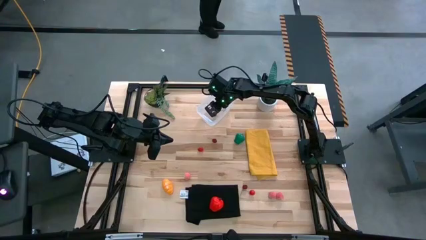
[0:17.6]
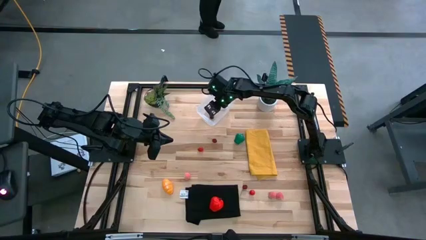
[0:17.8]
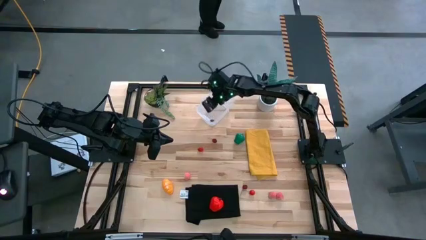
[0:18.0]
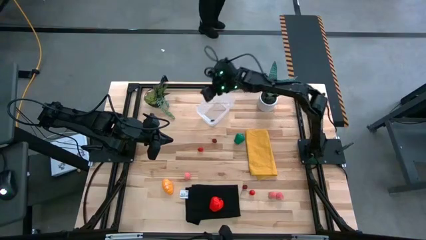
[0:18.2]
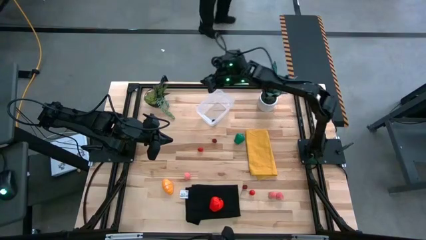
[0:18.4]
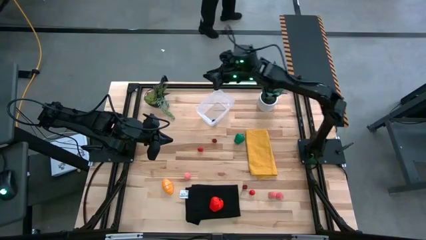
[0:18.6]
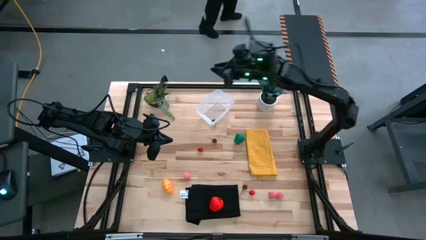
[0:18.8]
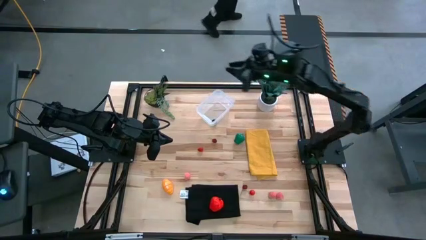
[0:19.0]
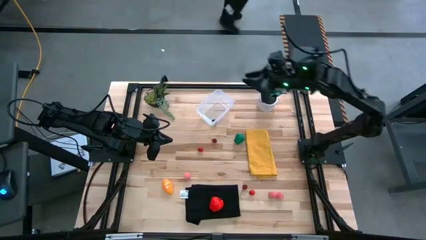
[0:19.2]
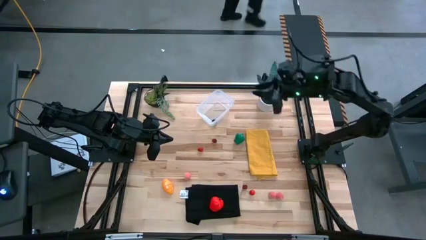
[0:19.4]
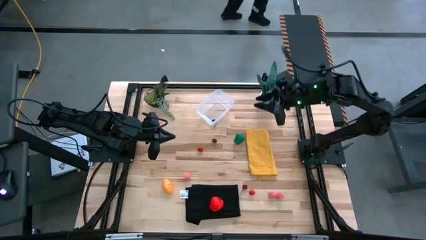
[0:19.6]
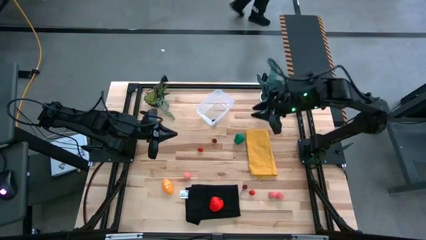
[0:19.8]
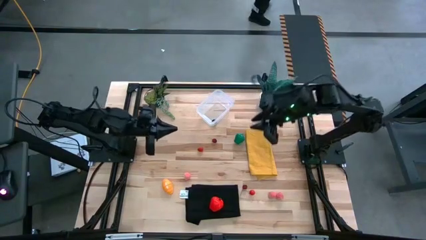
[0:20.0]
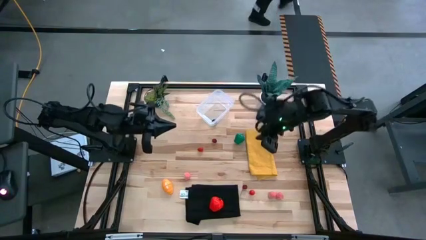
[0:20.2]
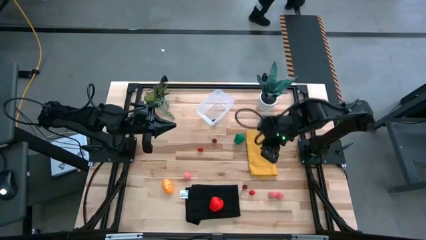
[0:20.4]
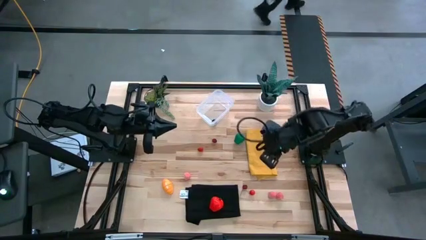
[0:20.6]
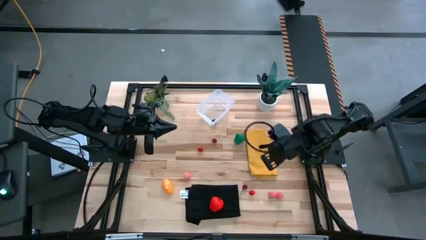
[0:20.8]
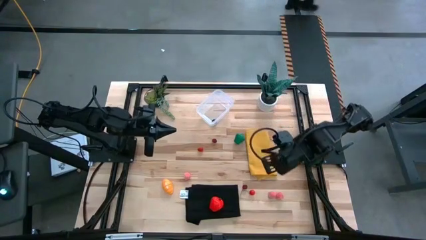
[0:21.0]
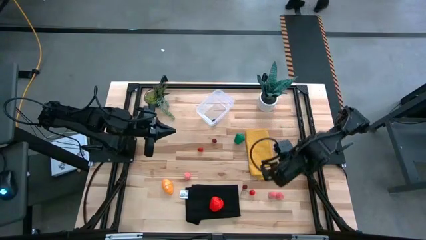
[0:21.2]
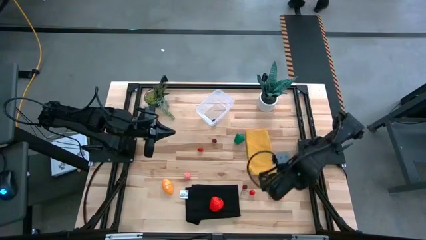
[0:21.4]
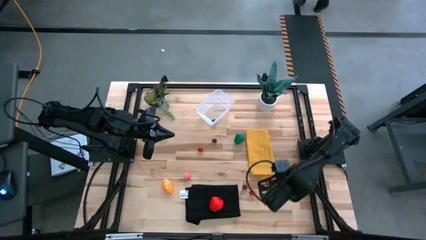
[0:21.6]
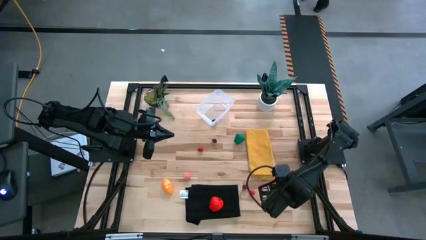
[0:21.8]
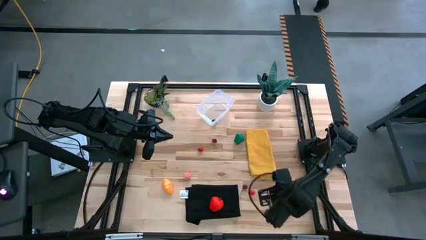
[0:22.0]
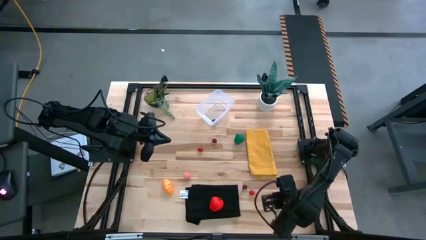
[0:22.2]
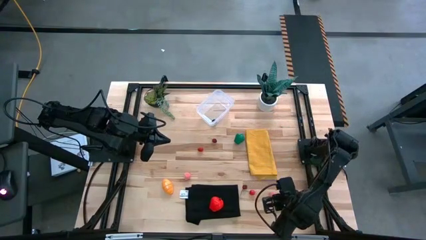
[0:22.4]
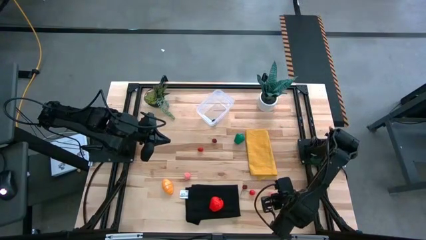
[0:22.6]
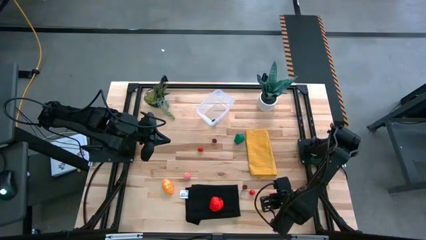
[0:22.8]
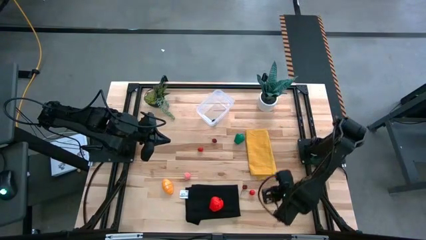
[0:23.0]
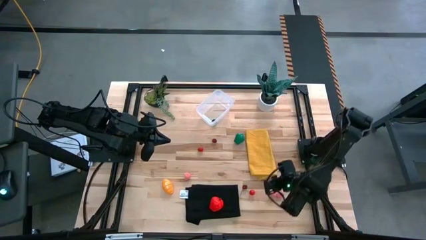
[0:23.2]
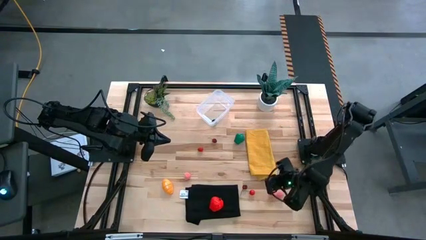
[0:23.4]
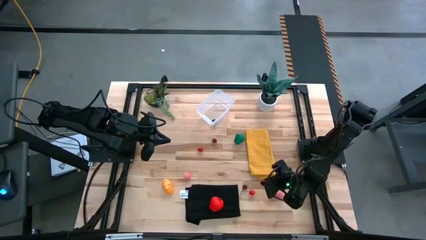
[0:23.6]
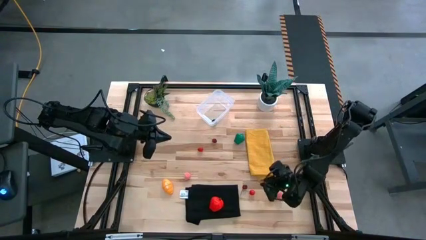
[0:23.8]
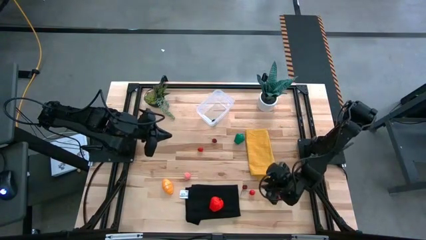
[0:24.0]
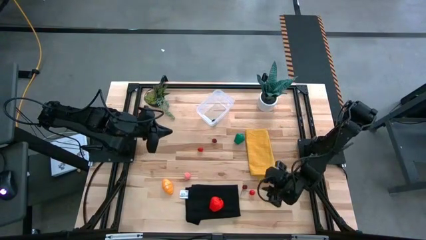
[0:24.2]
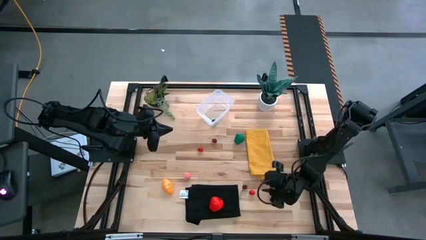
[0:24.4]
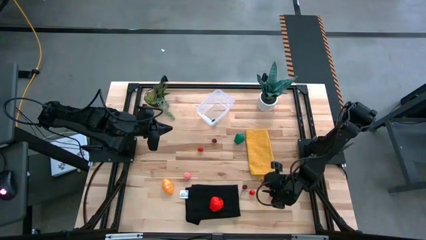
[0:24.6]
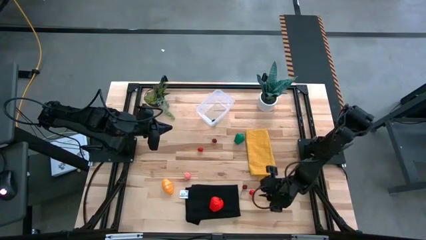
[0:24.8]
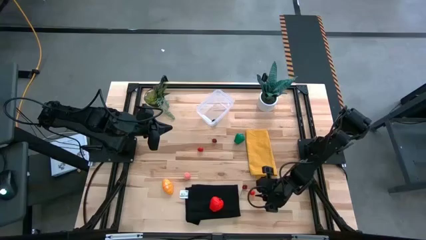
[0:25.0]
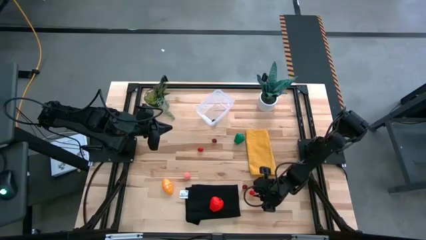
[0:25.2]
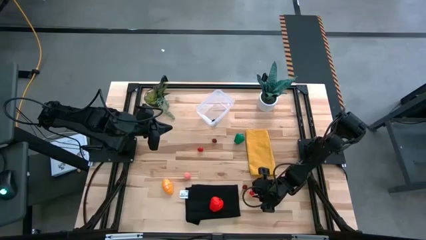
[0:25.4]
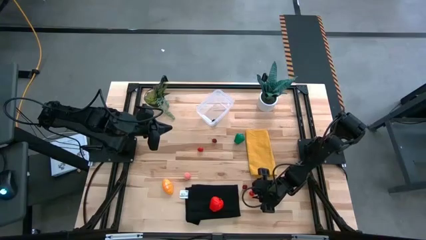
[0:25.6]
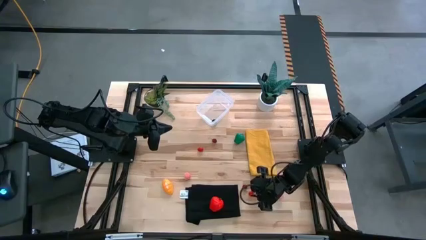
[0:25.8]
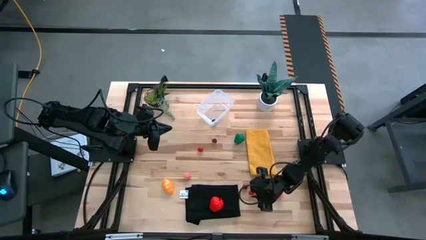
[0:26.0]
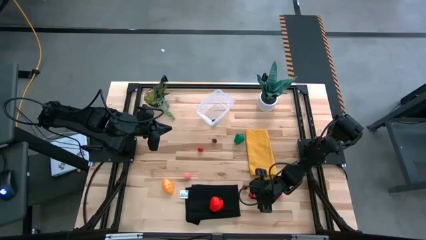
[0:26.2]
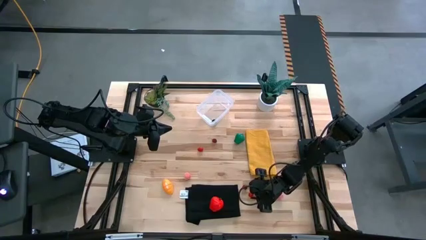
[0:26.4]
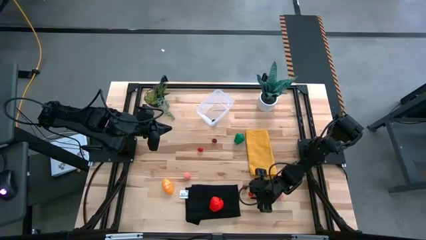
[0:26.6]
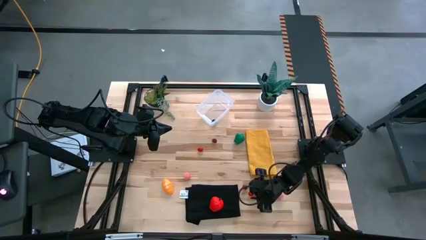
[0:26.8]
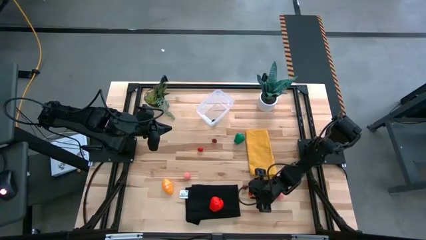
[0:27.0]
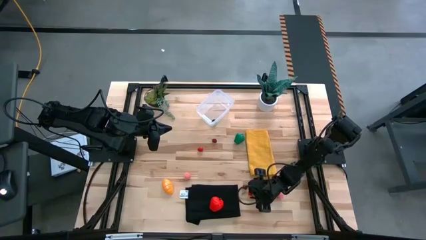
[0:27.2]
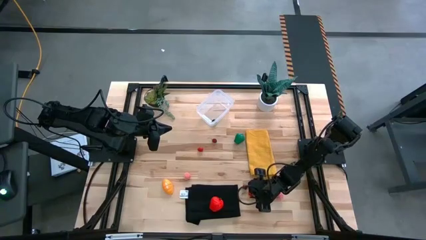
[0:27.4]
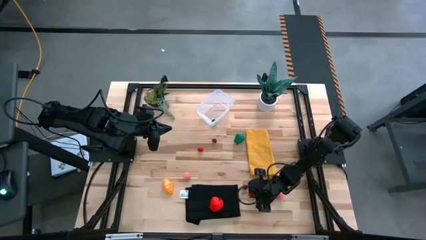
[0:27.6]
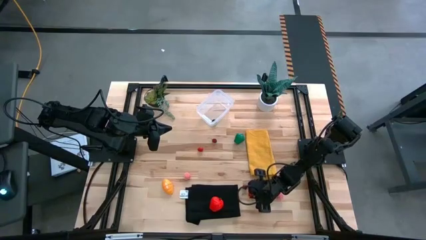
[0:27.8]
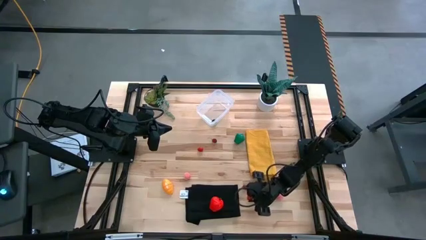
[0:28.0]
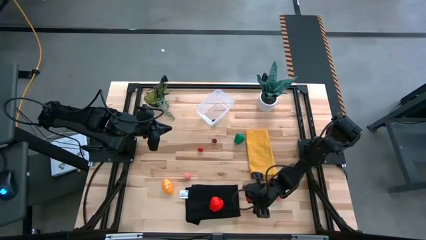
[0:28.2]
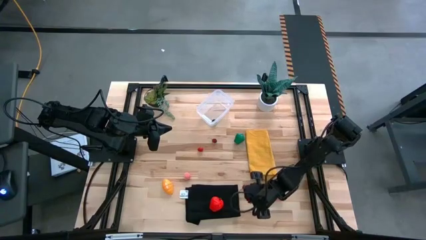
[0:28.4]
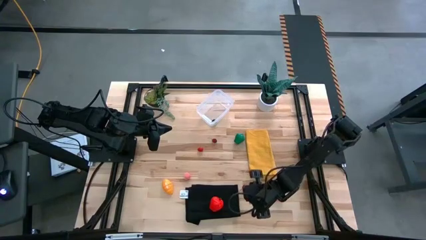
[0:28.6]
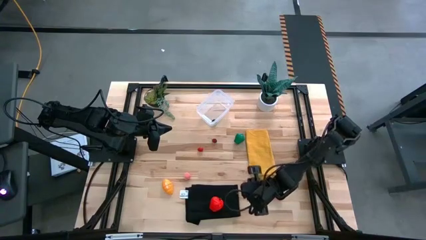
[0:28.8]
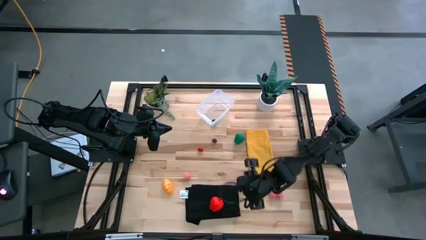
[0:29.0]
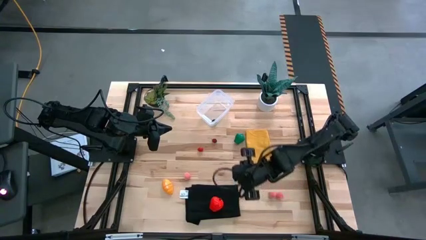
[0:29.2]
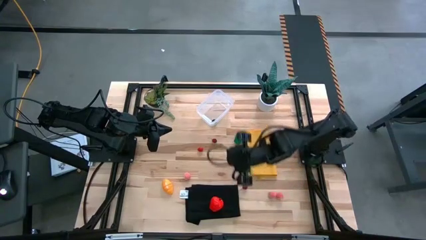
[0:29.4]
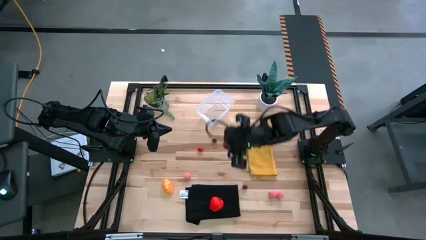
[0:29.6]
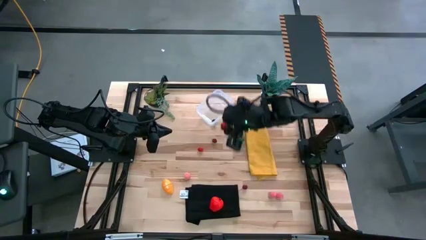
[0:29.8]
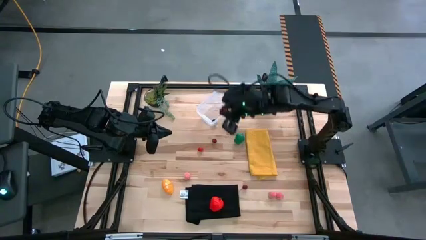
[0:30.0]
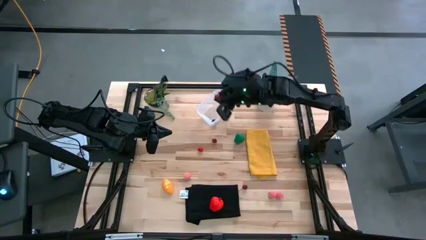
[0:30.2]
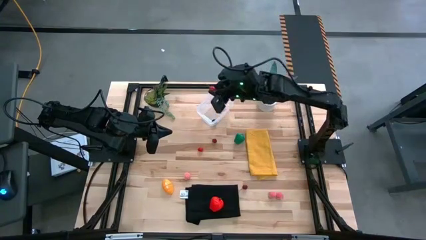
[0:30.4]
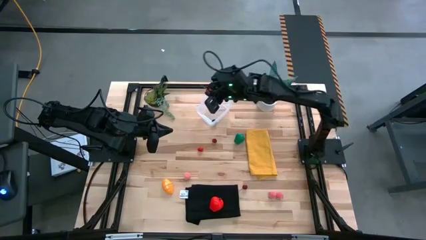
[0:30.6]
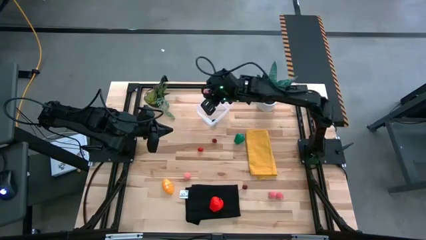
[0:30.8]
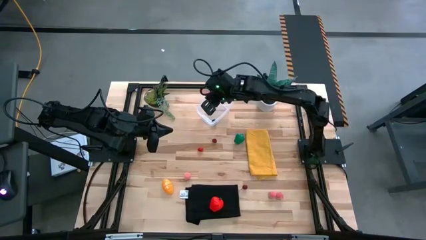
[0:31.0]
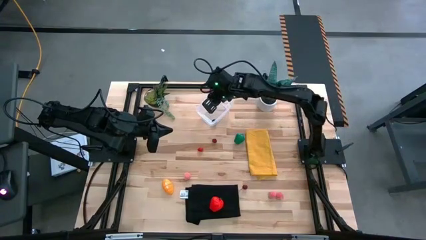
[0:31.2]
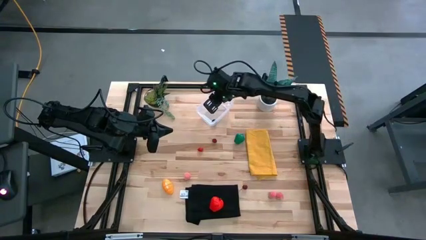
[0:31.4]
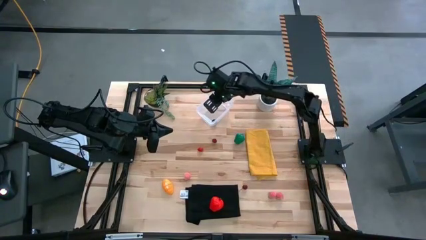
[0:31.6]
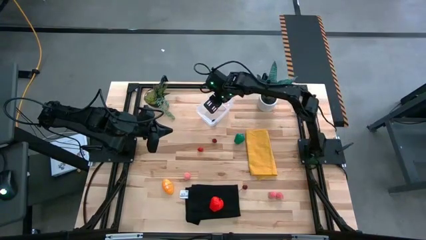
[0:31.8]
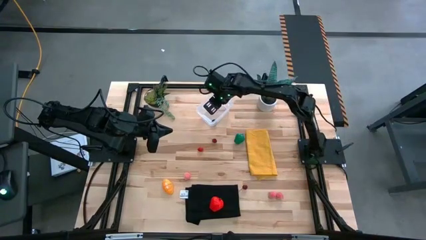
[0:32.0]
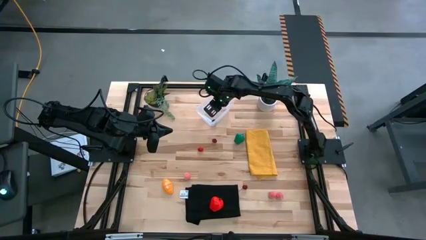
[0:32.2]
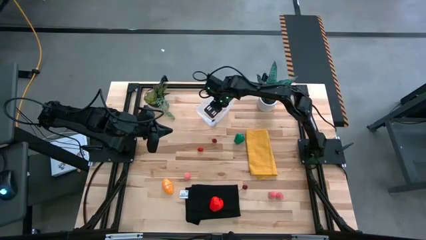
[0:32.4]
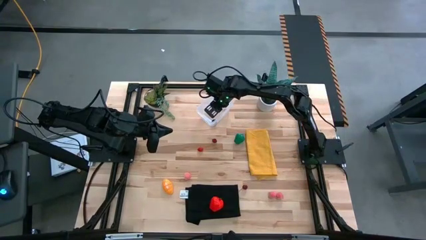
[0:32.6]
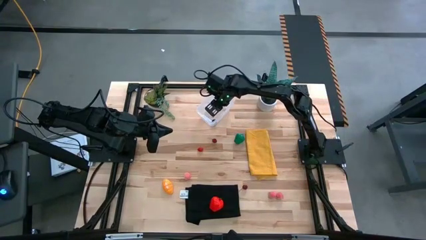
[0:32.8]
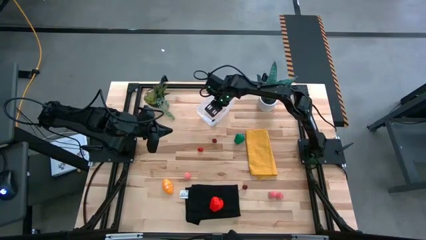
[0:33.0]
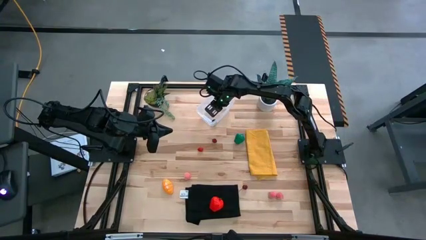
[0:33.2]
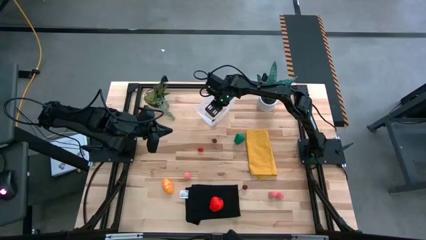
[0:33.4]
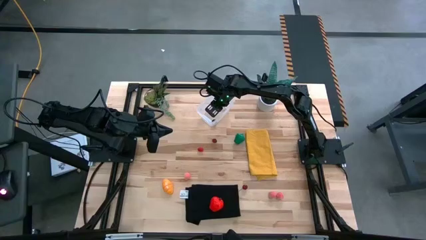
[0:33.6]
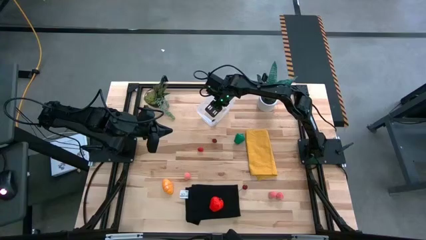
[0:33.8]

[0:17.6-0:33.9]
Task: Pick and placing Produce into tupperware
Put the bottom right red cherry into the transparent bin
